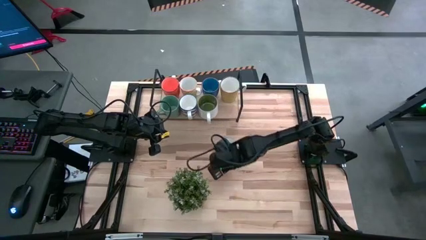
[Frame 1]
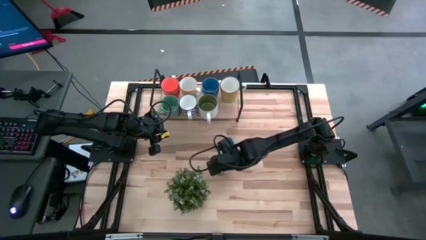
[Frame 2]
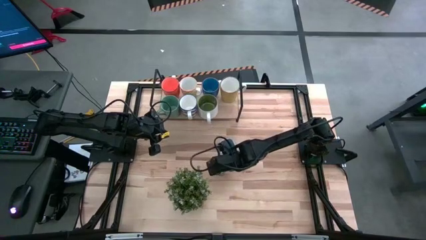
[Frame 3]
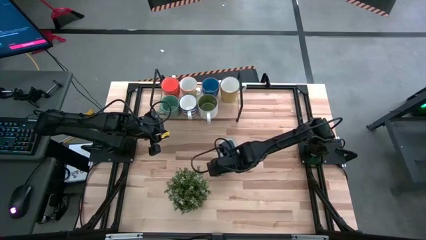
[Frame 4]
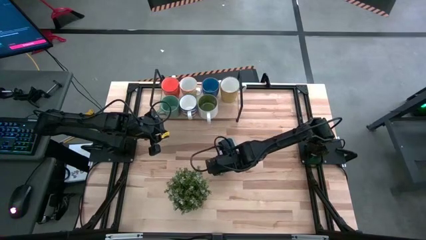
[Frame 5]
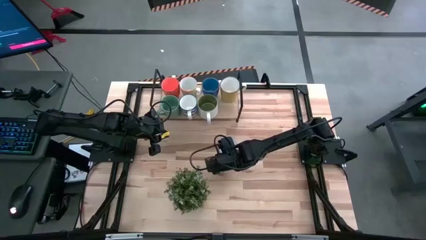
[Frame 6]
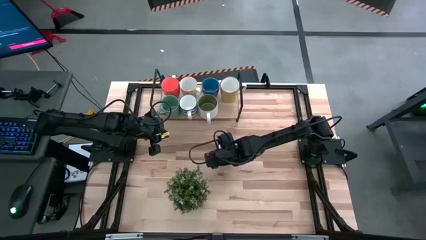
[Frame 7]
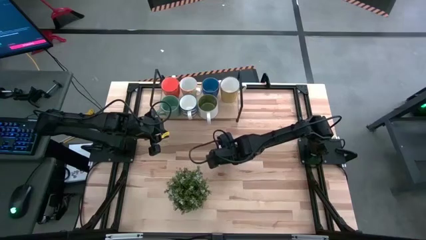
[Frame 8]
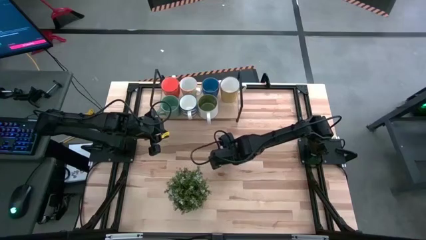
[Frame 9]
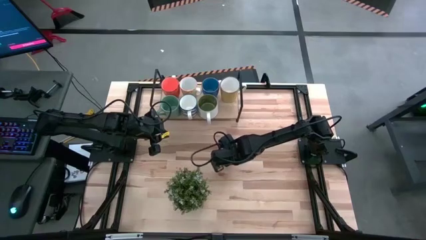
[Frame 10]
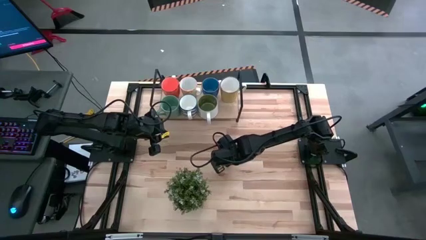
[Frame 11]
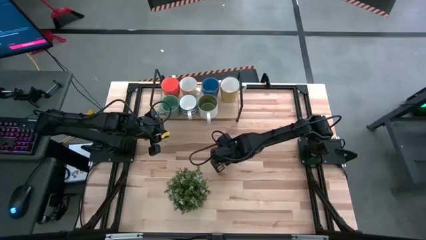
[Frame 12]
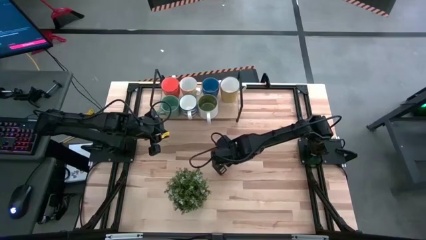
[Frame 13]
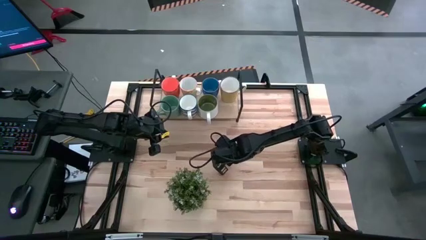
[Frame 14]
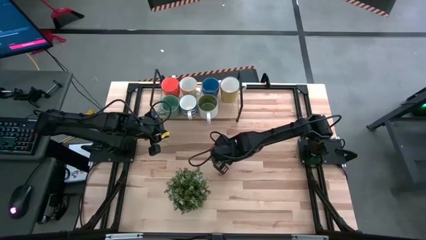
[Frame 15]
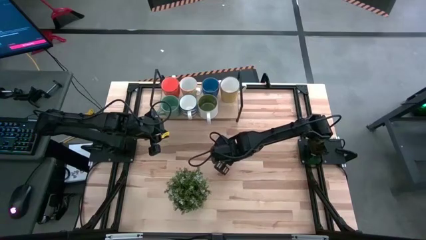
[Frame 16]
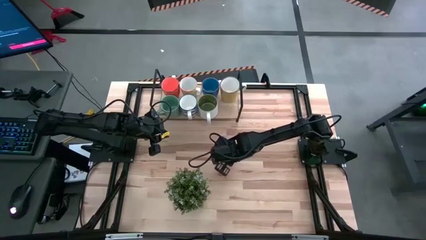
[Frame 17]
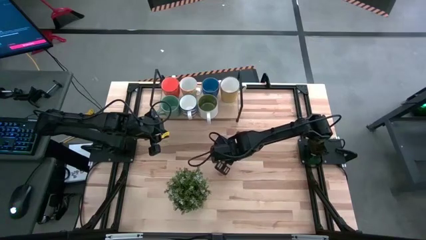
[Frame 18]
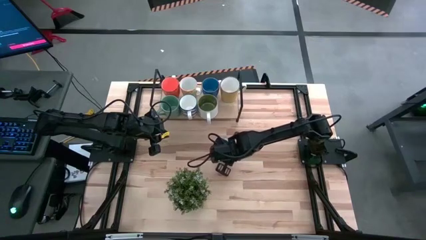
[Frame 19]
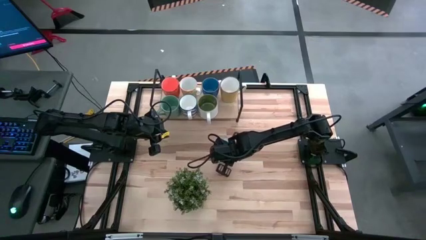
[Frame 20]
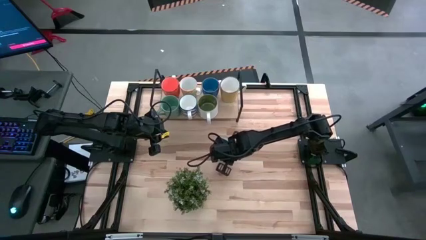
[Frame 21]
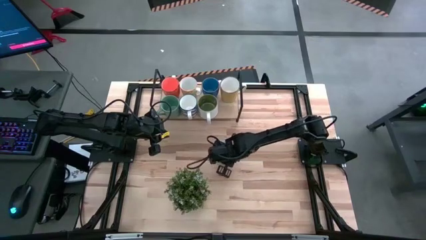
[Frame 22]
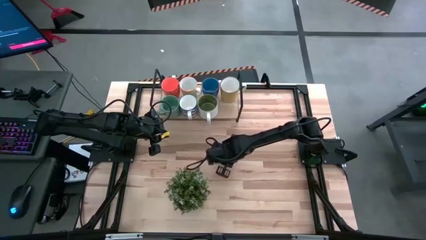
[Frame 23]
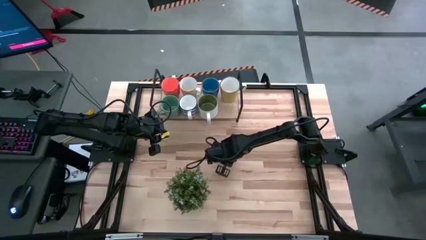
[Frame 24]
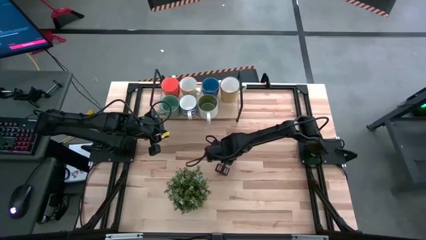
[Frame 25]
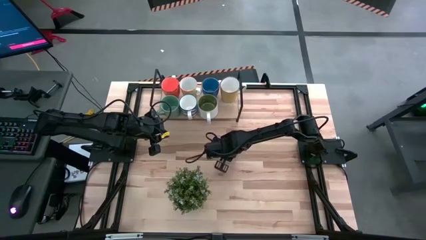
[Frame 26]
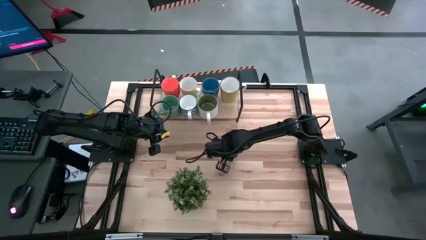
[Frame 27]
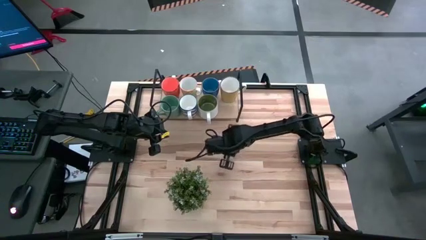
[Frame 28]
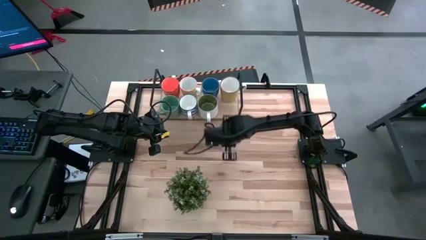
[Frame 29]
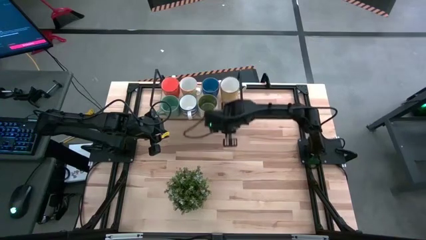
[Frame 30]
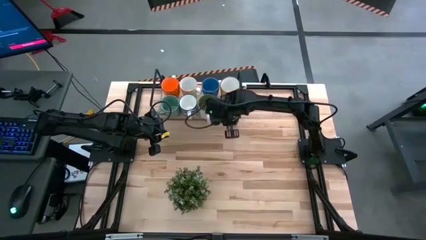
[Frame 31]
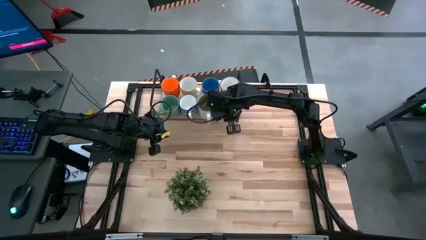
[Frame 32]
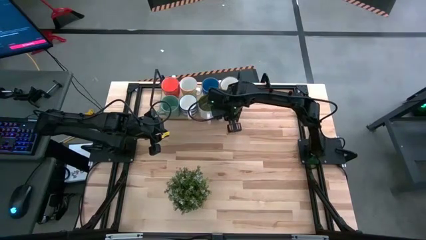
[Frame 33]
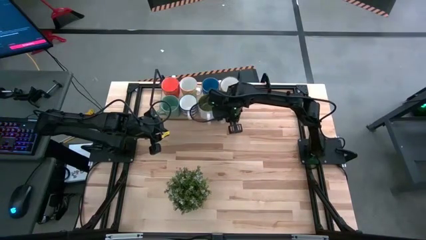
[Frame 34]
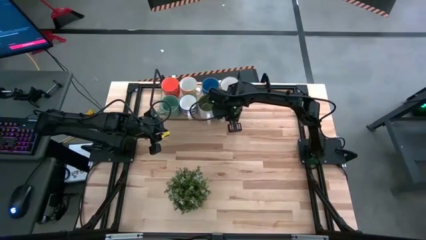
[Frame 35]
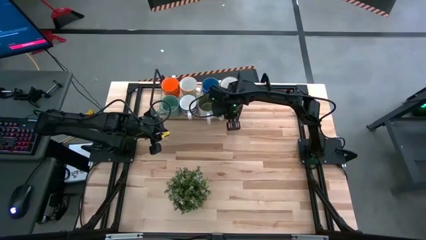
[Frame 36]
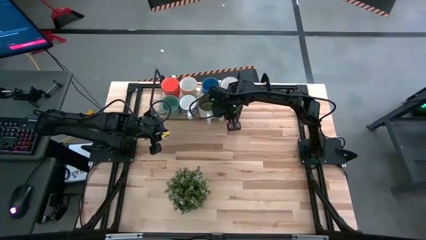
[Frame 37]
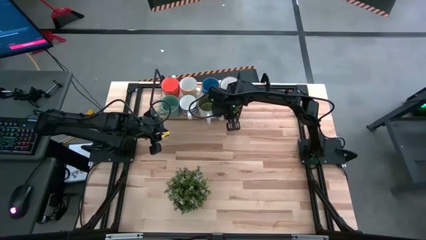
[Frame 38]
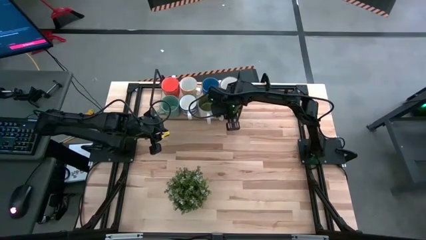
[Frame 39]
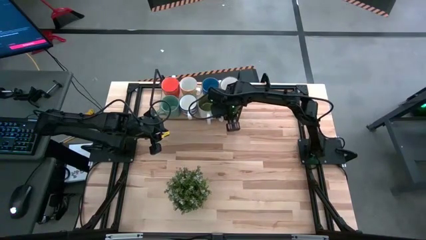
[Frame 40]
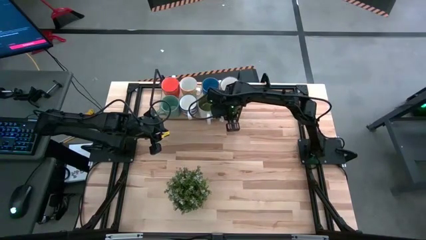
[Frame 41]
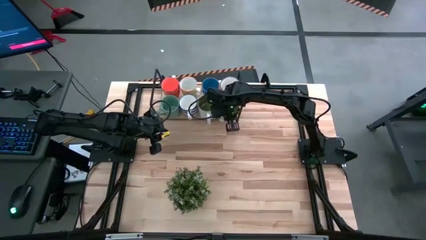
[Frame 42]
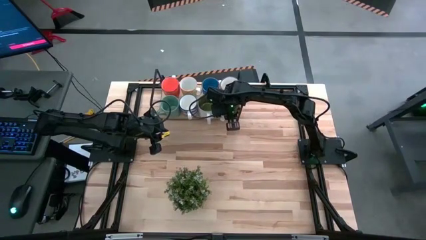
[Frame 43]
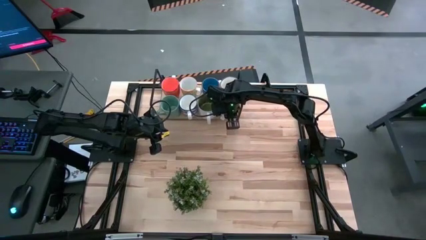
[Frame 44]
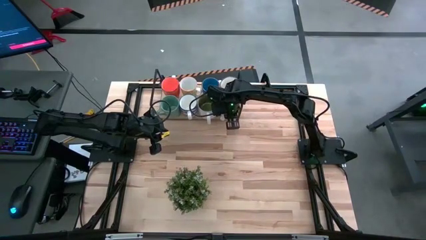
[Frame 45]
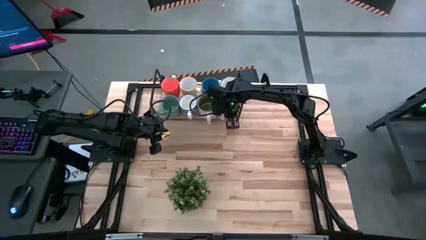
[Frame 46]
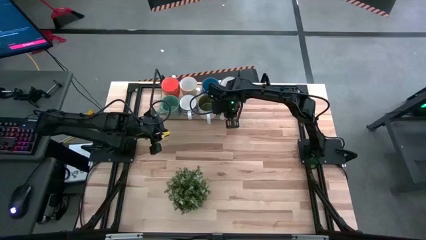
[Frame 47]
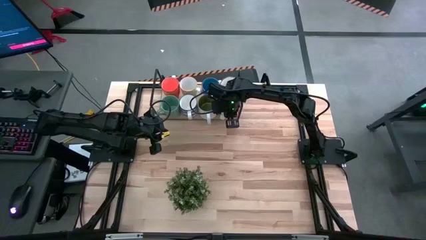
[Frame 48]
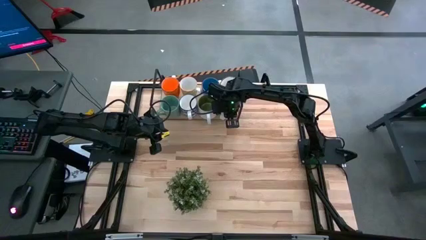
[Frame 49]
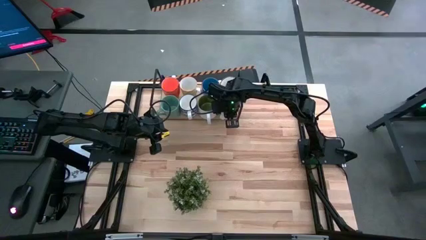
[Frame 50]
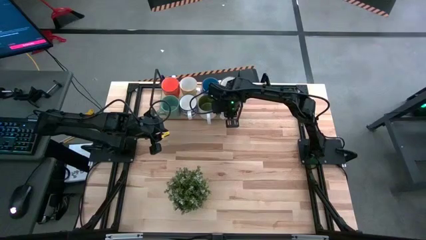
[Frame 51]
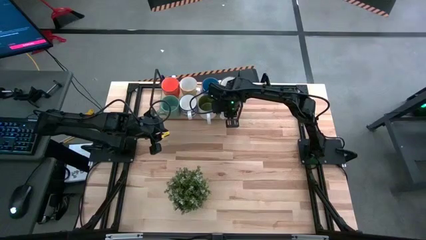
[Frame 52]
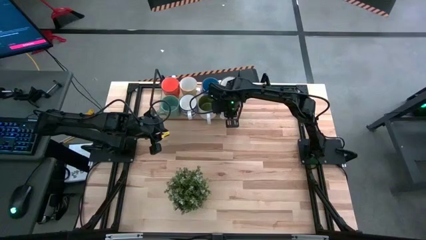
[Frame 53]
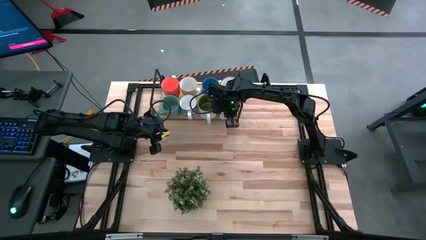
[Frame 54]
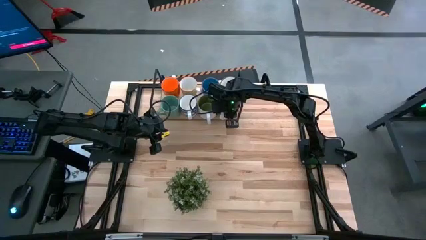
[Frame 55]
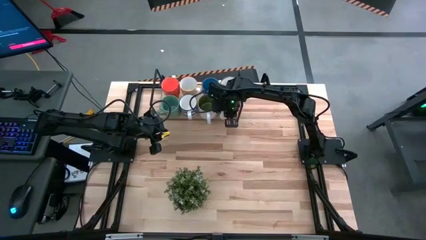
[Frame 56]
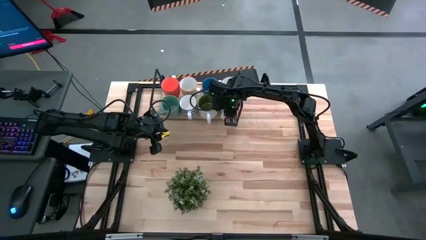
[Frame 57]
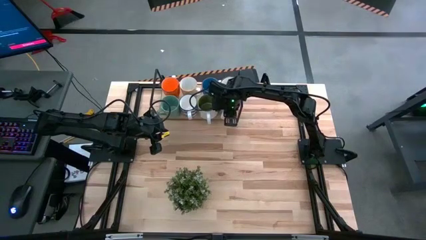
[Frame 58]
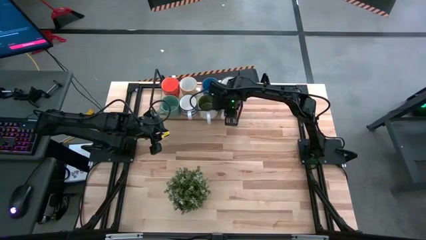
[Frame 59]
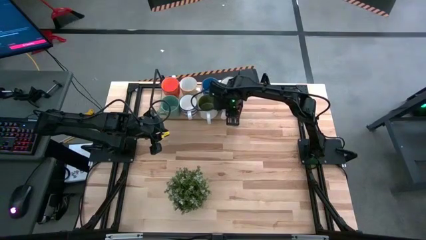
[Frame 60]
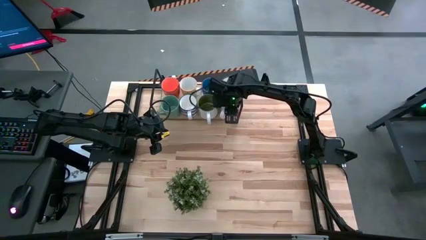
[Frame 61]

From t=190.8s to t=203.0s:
Task: Place coffee mugs
Put the red patterned mug on the shelf
